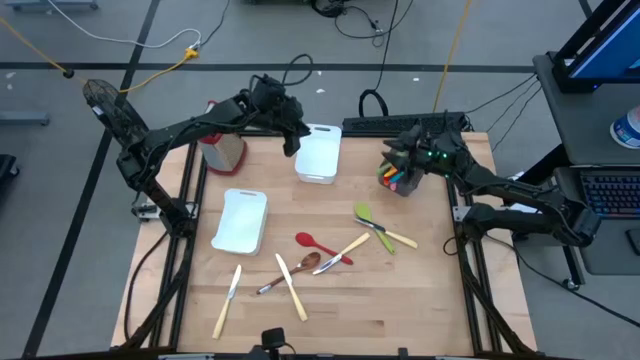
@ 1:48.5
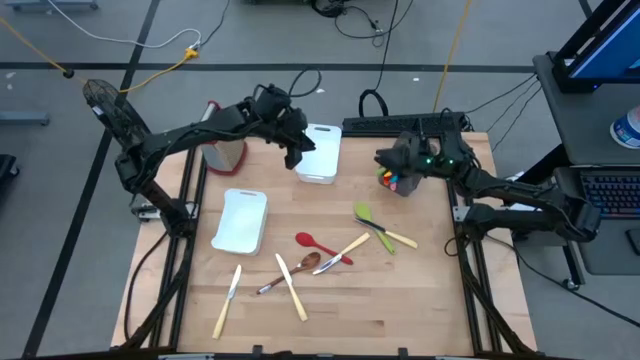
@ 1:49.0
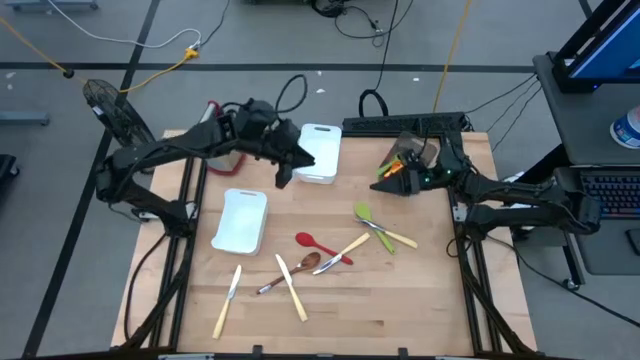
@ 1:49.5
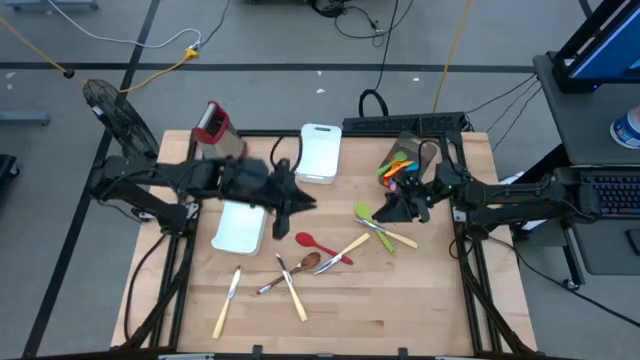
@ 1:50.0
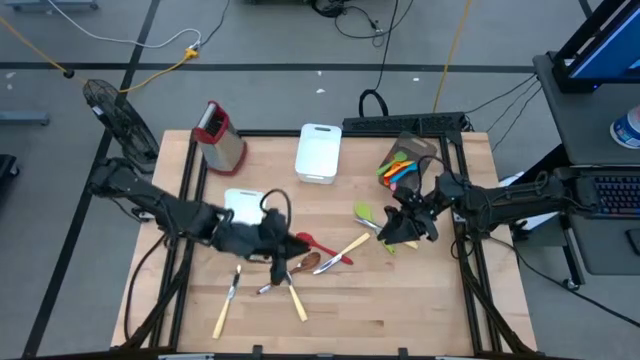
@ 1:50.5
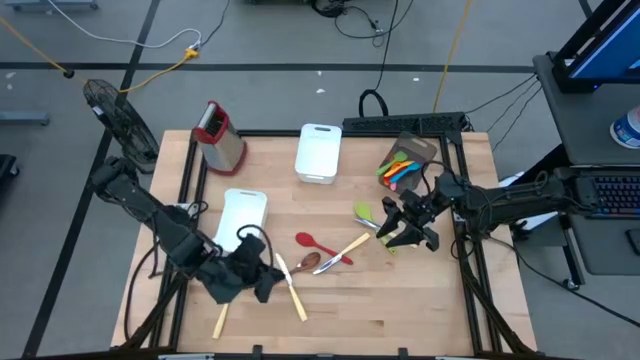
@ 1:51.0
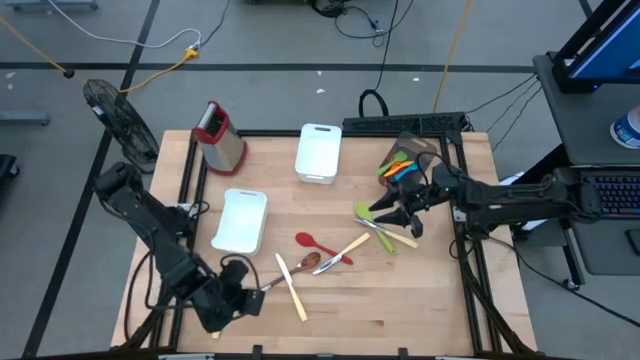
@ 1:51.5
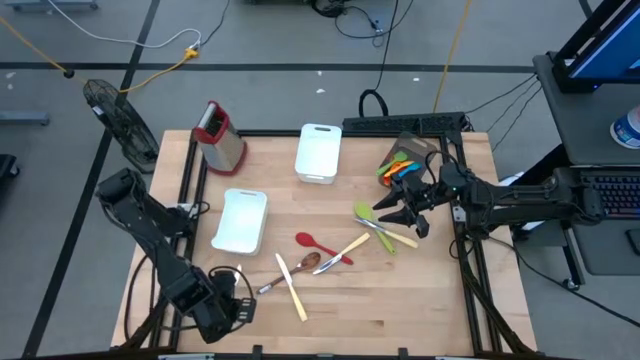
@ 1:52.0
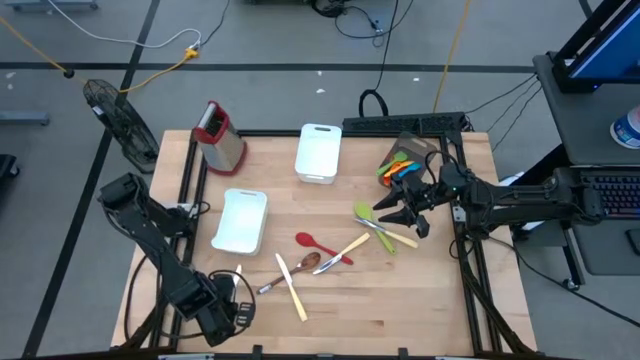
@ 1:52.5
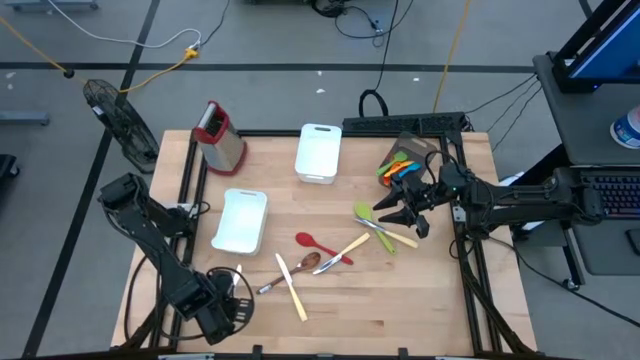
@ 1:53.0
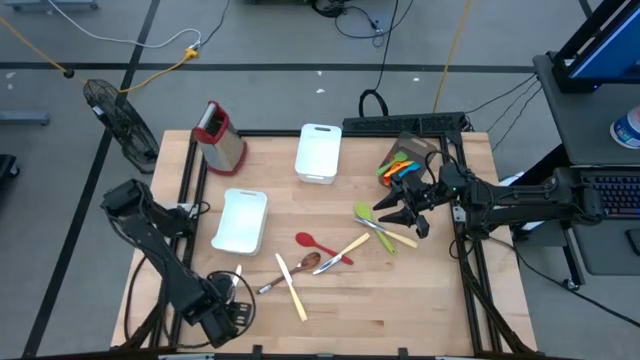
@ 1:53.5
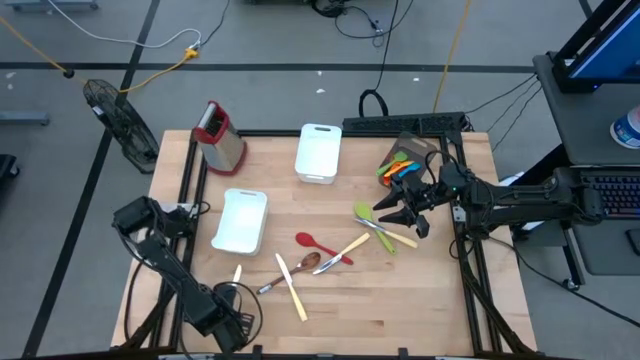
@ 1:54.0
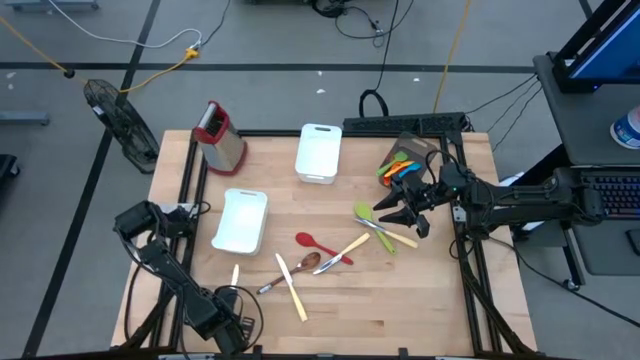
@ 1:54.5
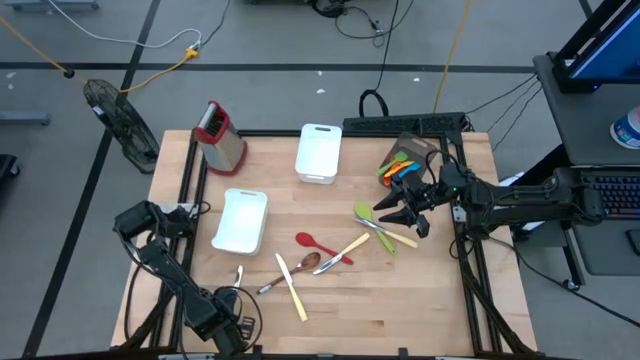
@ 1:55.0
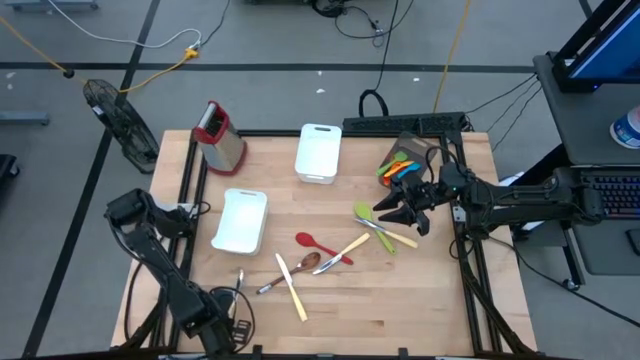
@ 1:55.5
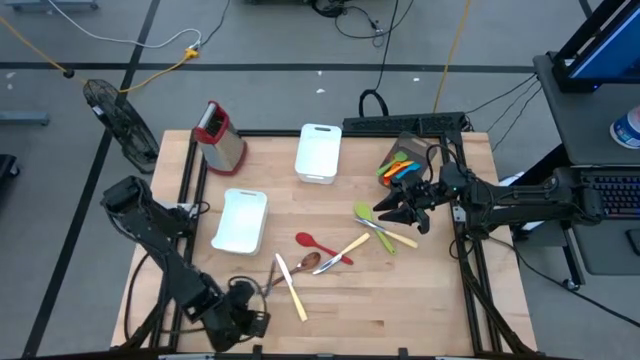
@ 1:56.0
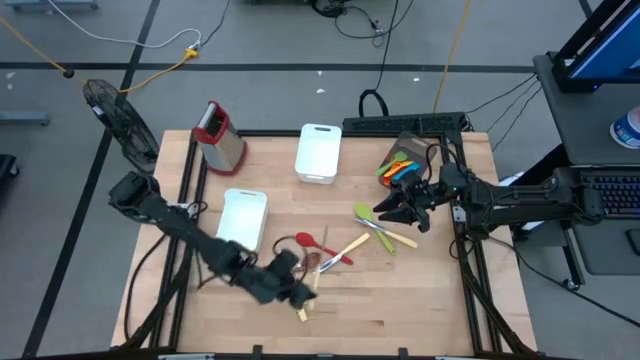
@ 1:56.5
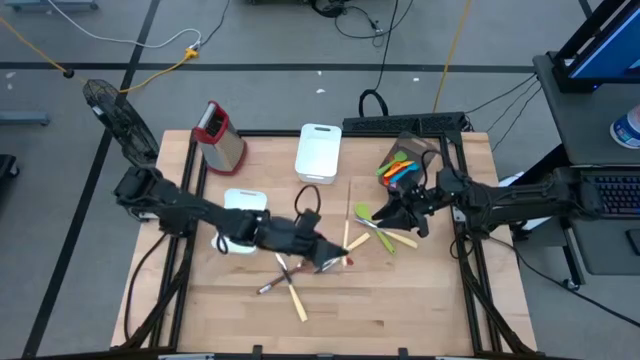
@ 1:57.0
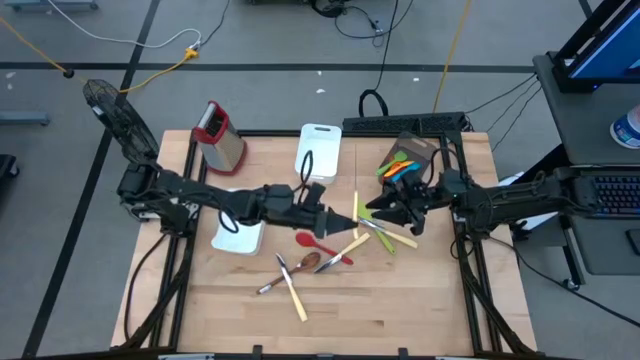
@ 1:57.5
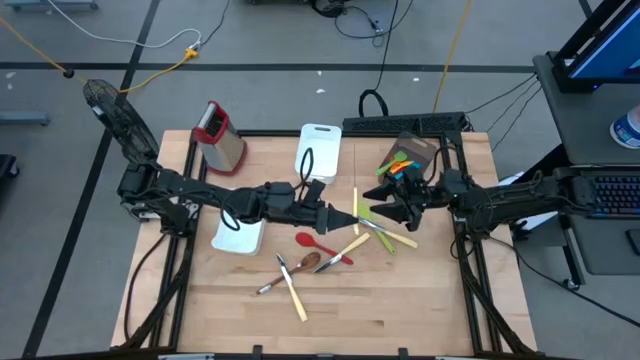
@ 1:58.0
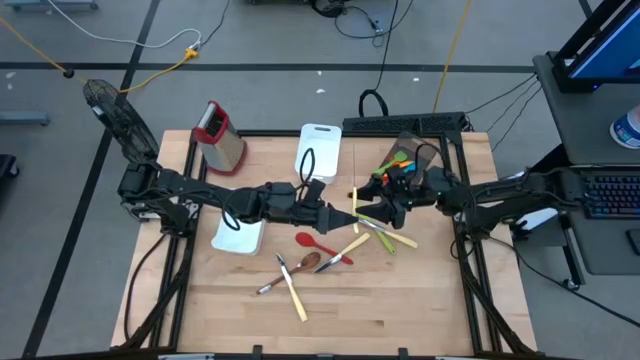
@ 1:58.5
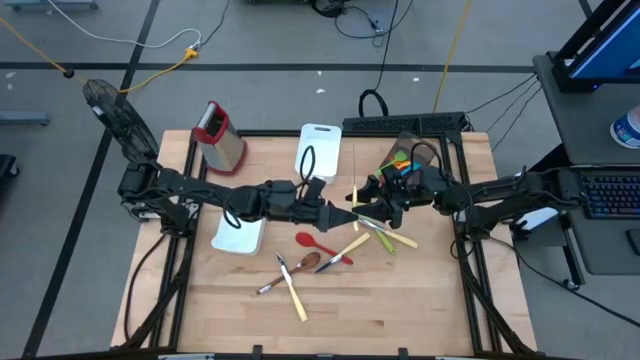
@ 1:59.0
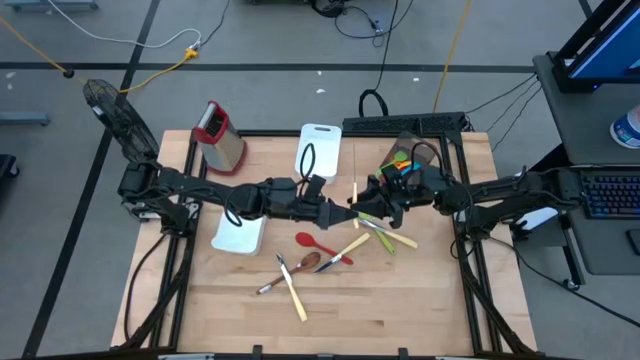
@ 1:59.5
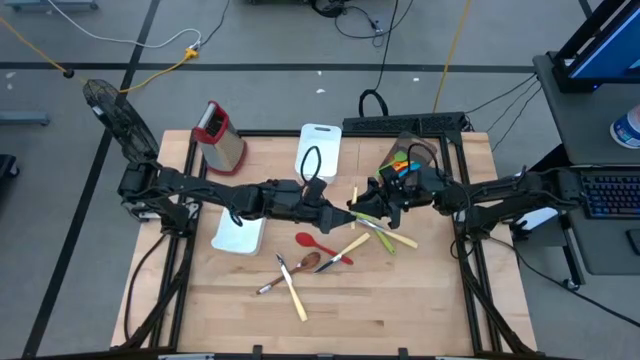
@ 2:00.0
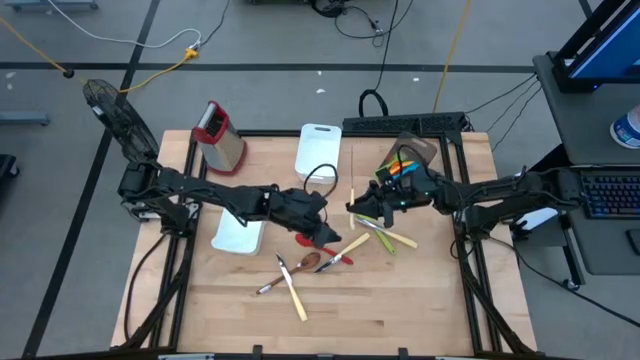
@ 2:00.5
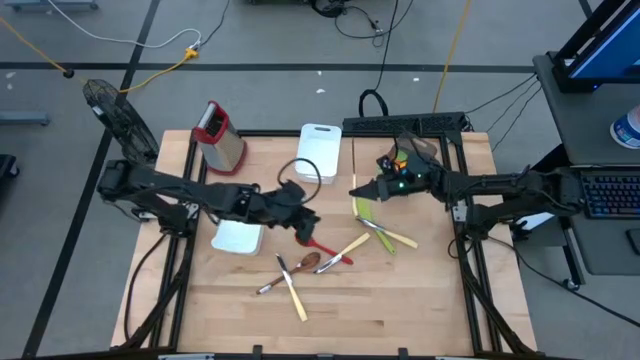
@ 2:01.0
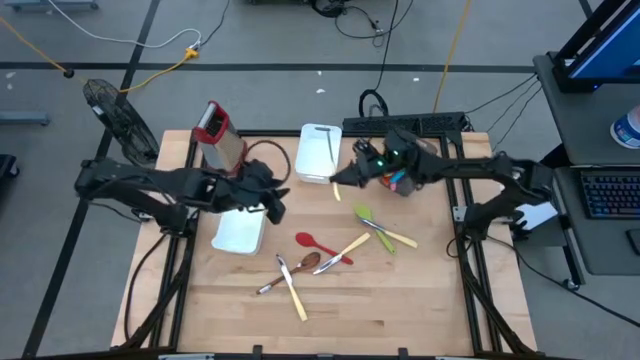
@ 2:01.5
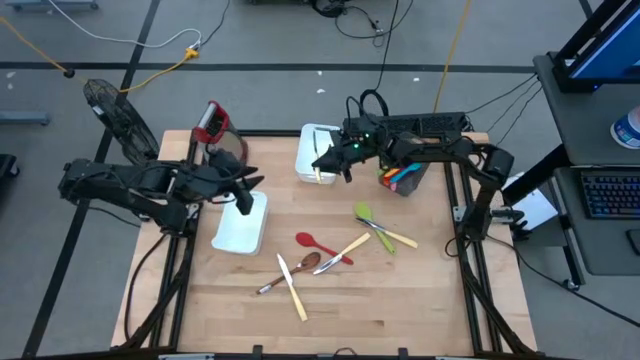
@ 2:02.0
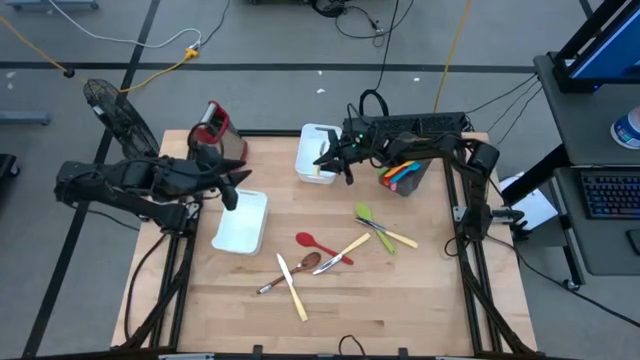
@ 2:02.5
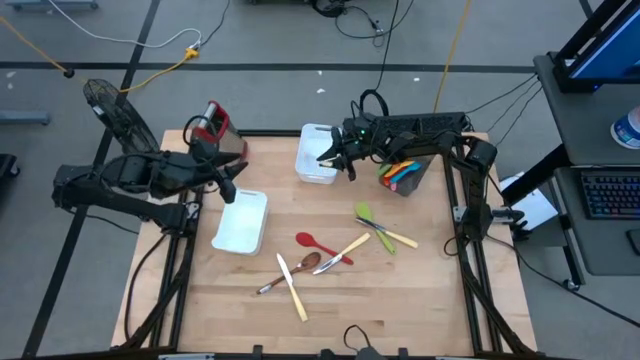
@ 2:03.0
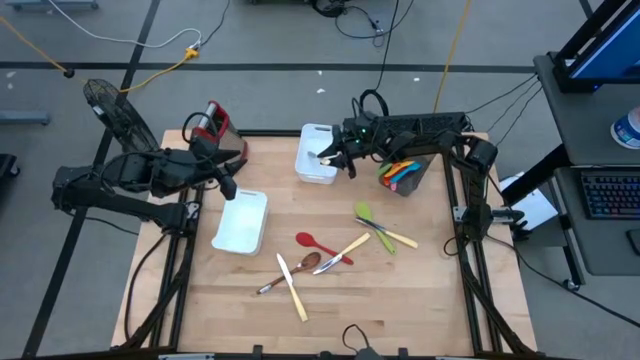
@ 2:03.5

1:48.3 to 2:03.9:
Task: Pick & Place Kitchen Items
Put the yellow table knife into the top white bin

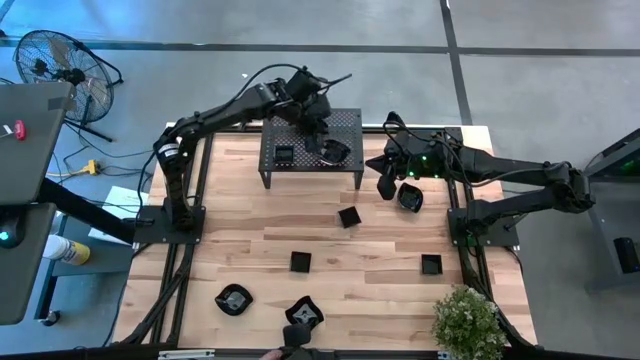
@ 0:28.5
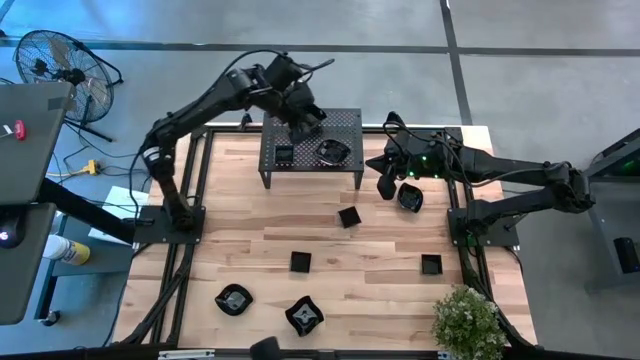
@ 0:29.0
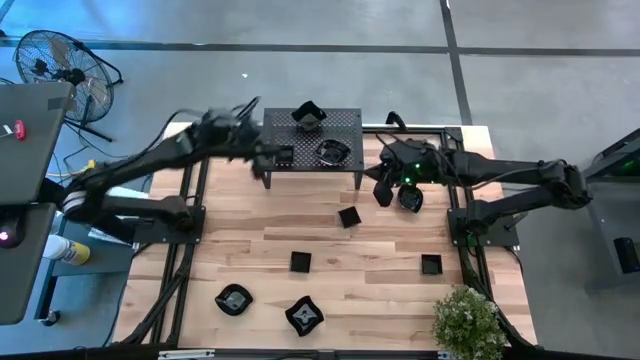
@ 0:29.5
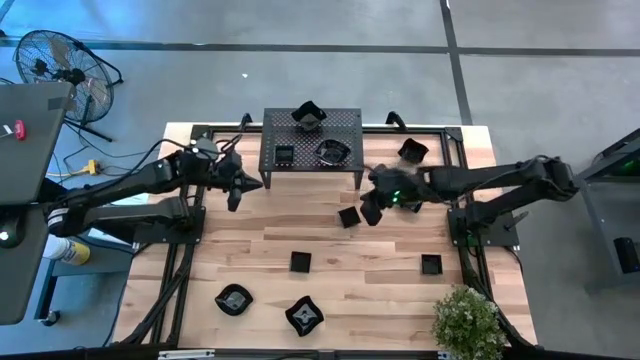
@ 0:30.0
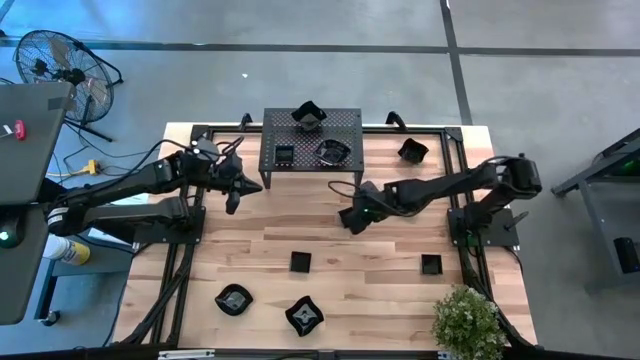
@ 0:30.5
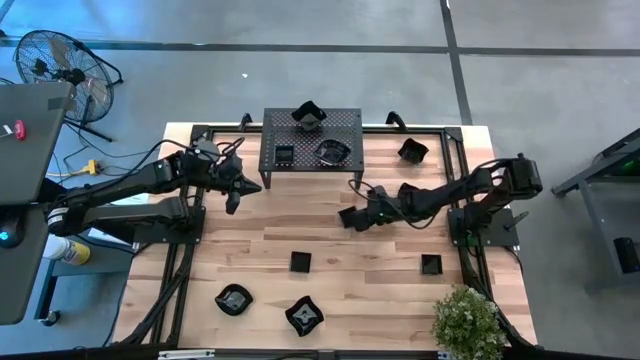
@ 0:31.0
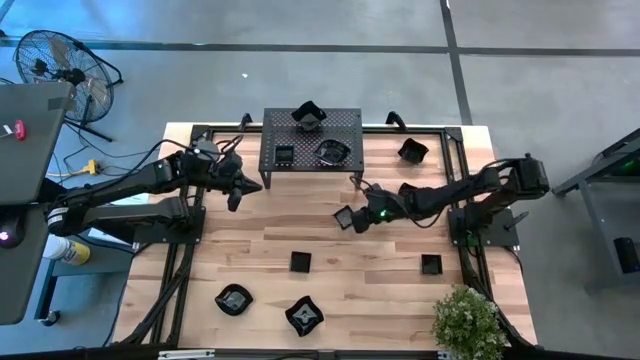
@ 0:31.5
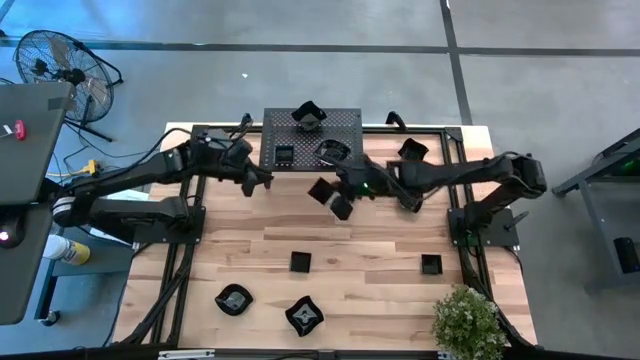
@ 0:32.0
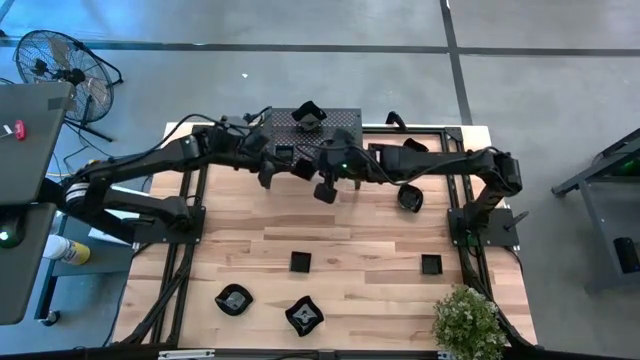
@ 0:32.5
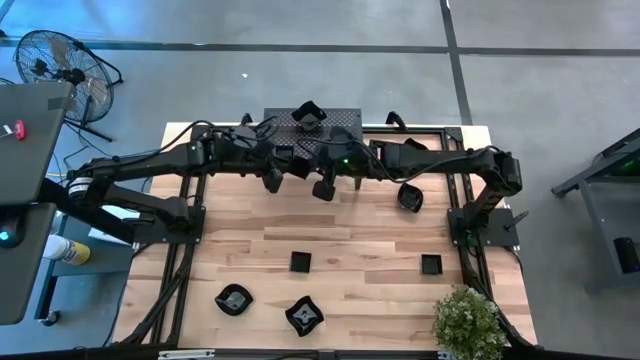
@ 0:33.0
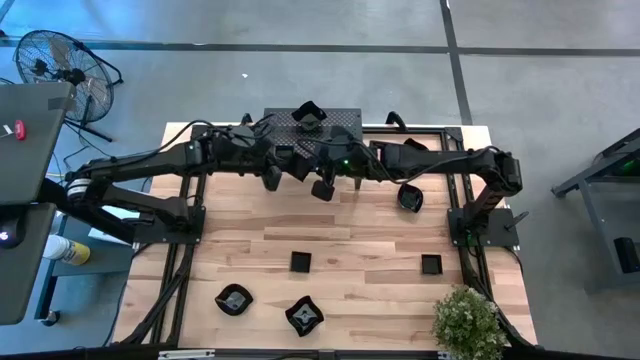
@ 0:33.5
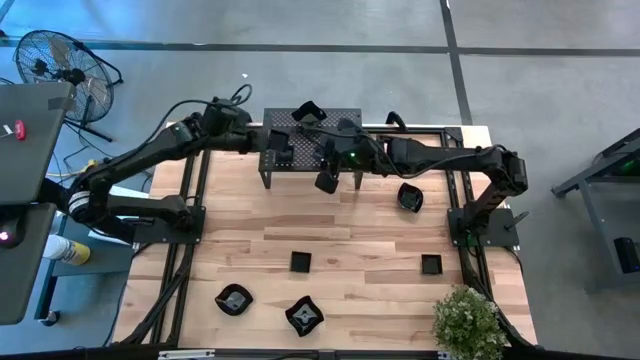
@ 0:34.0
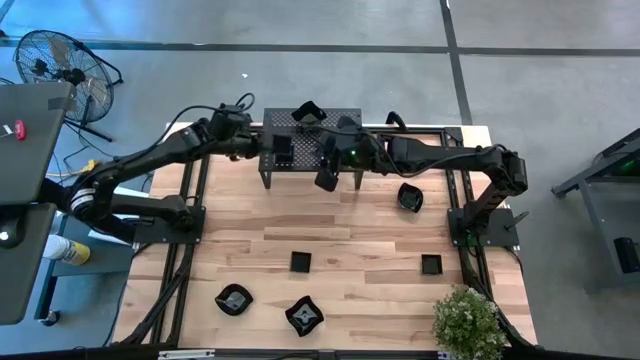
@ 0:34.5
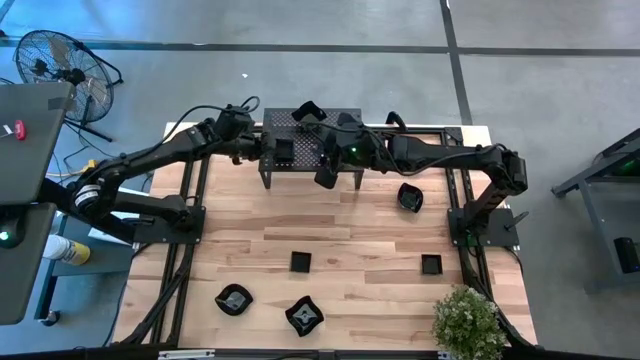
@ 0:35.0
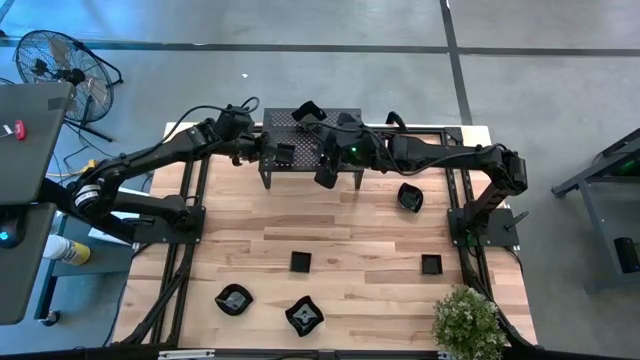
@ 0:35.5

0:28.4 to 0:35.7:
Task: Pick & Place Mini shaped plates
Stack the black square plate on top of the black square plate on the shelf
